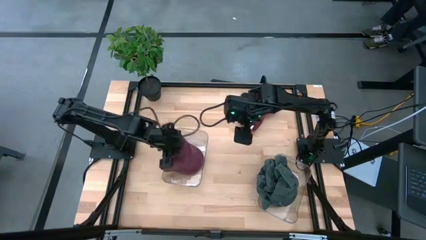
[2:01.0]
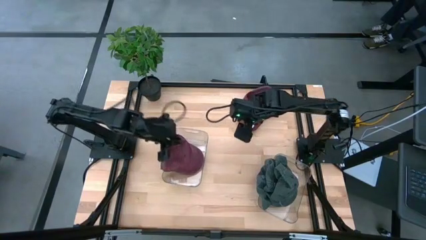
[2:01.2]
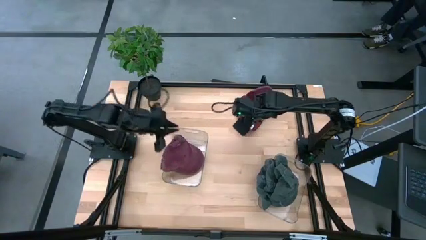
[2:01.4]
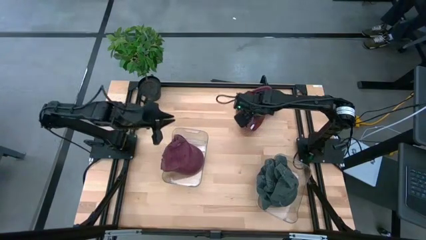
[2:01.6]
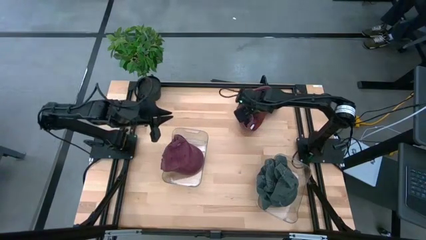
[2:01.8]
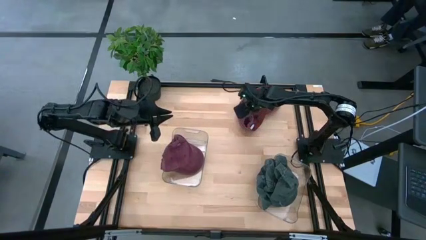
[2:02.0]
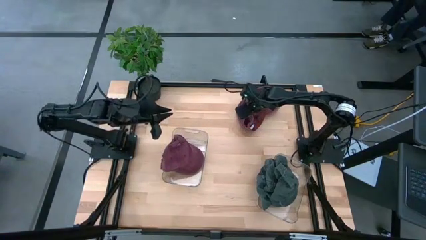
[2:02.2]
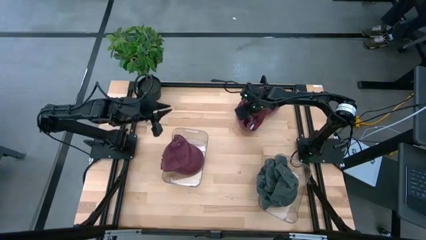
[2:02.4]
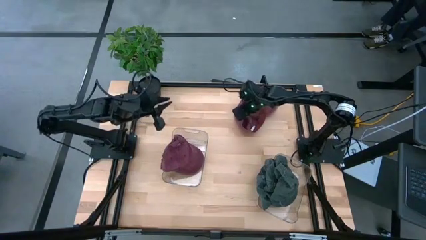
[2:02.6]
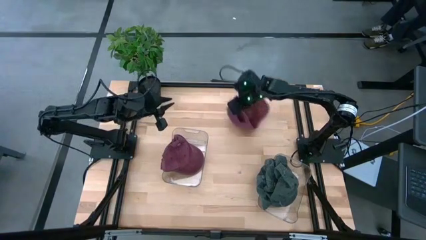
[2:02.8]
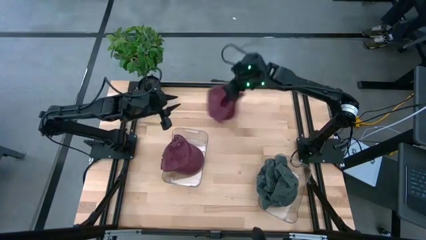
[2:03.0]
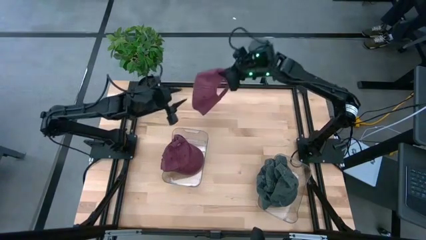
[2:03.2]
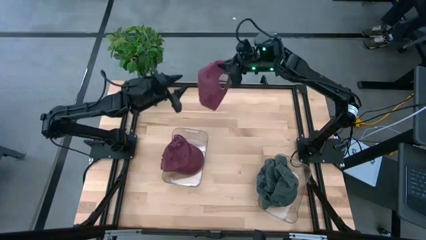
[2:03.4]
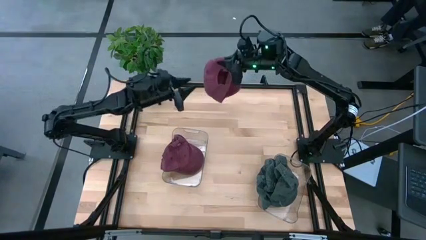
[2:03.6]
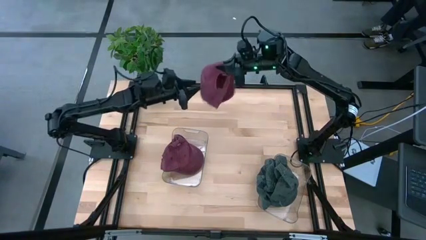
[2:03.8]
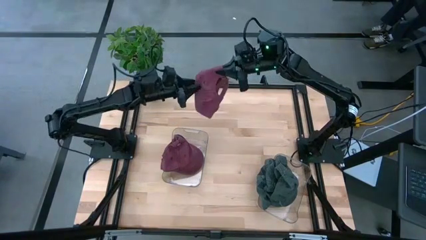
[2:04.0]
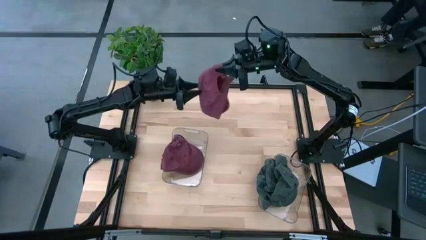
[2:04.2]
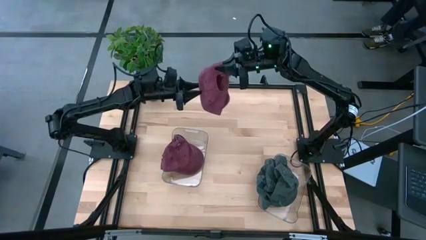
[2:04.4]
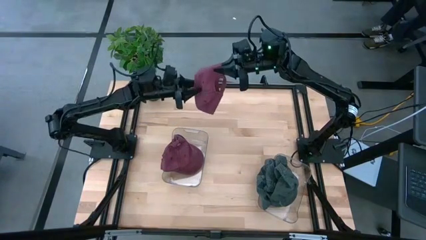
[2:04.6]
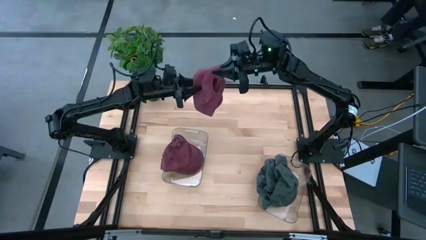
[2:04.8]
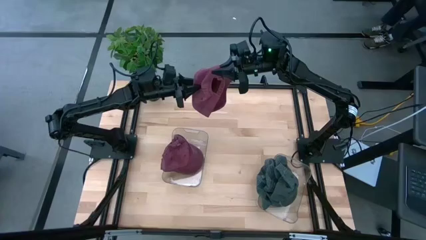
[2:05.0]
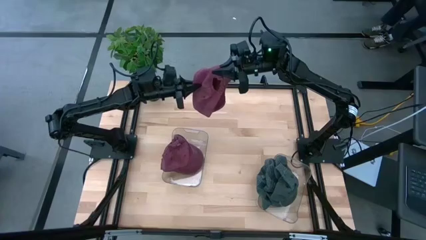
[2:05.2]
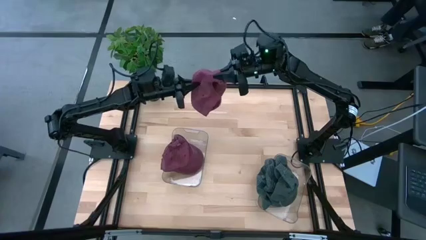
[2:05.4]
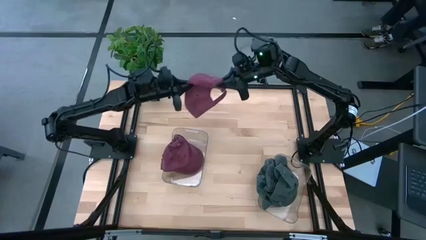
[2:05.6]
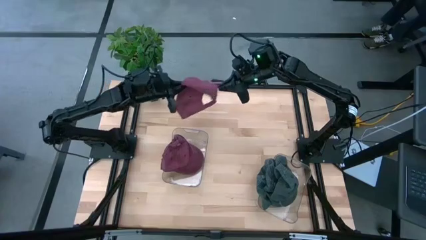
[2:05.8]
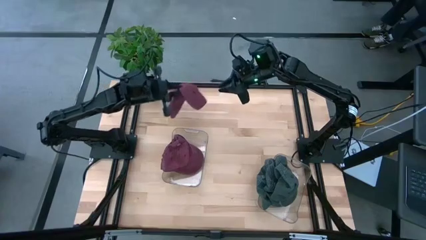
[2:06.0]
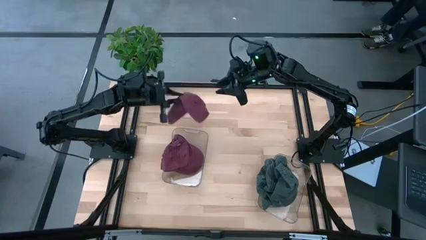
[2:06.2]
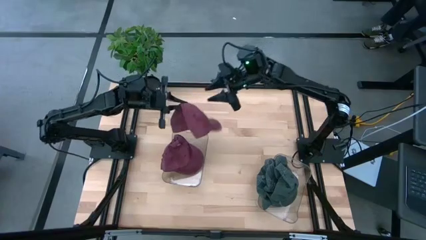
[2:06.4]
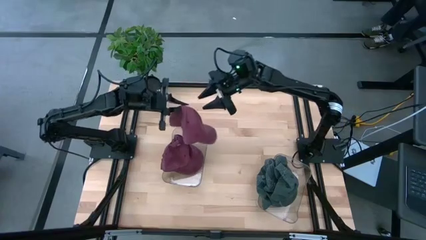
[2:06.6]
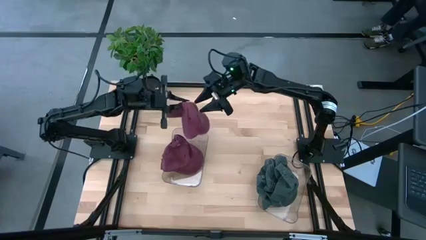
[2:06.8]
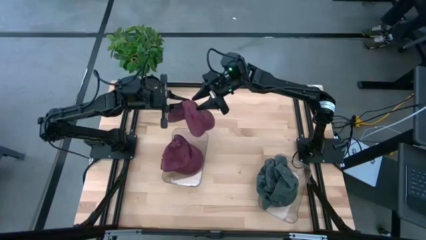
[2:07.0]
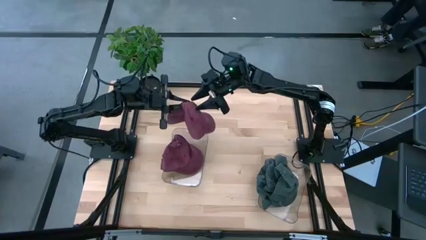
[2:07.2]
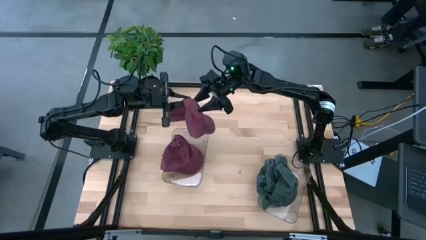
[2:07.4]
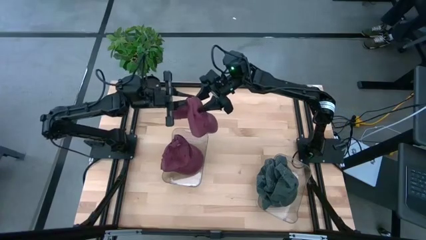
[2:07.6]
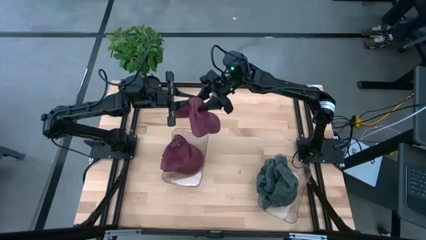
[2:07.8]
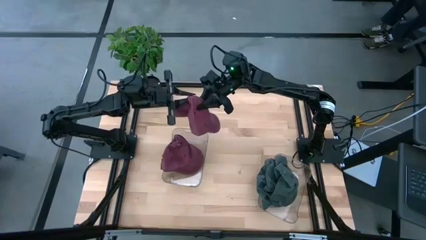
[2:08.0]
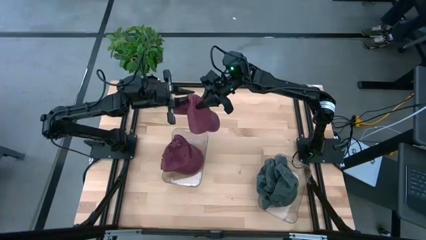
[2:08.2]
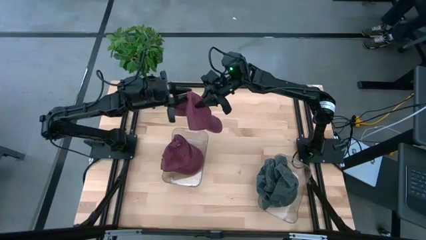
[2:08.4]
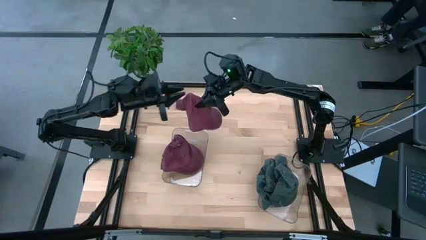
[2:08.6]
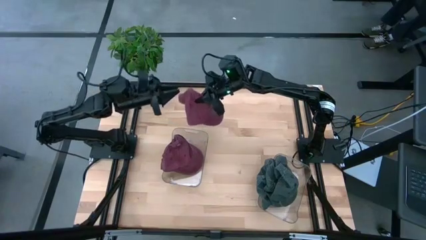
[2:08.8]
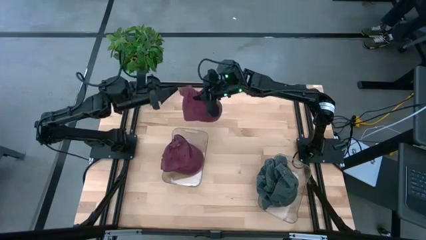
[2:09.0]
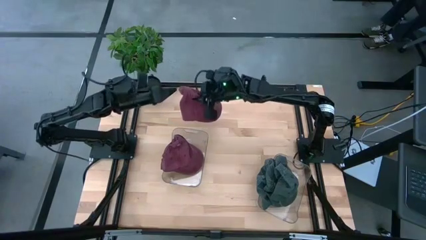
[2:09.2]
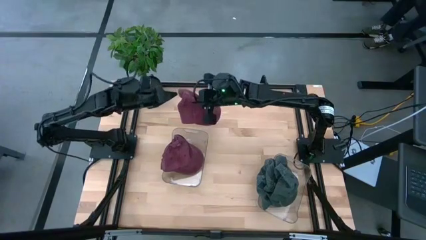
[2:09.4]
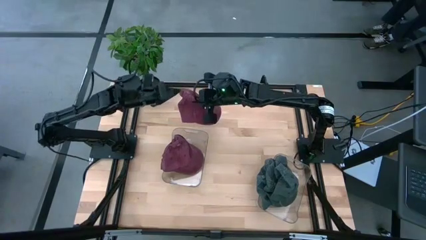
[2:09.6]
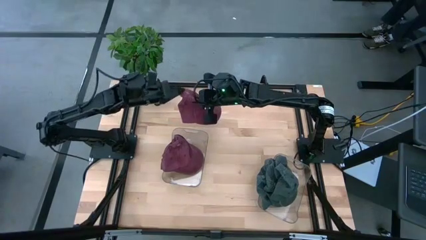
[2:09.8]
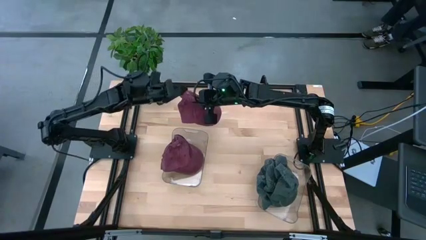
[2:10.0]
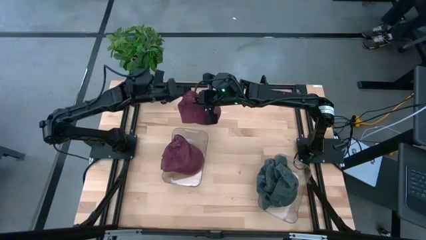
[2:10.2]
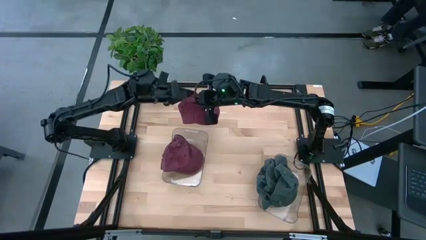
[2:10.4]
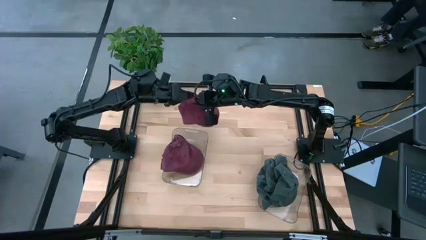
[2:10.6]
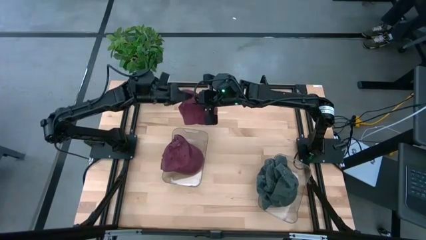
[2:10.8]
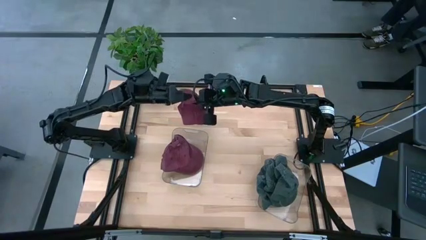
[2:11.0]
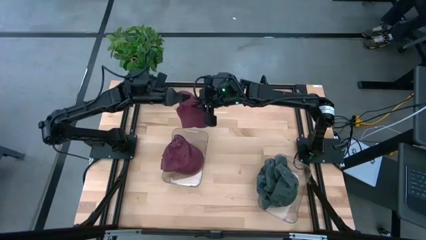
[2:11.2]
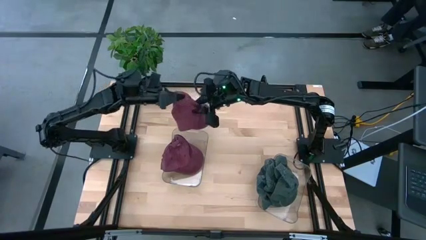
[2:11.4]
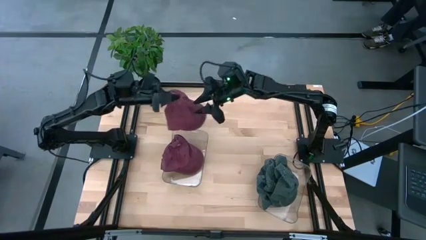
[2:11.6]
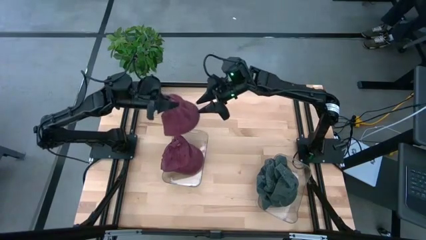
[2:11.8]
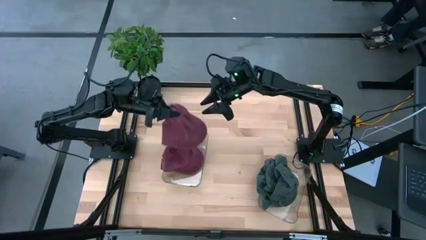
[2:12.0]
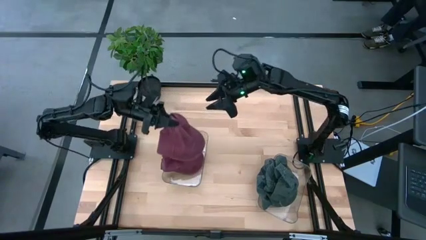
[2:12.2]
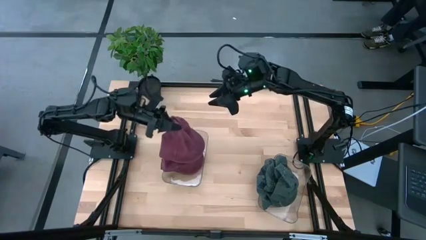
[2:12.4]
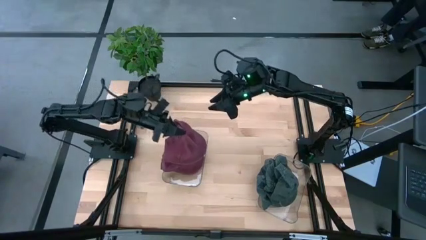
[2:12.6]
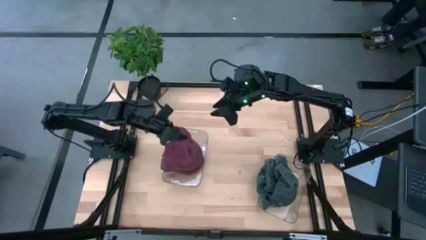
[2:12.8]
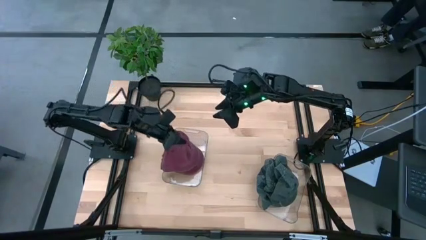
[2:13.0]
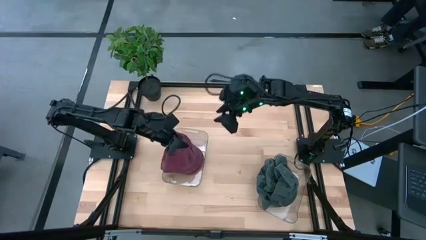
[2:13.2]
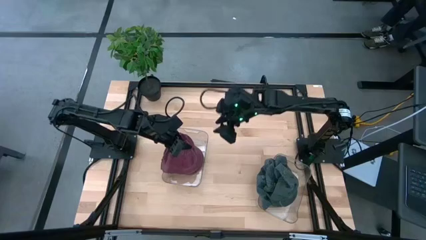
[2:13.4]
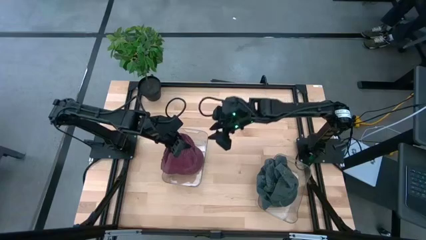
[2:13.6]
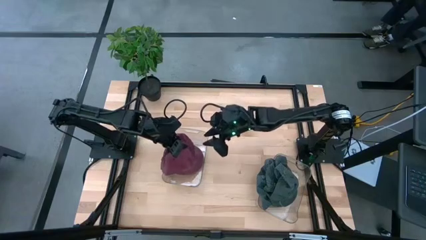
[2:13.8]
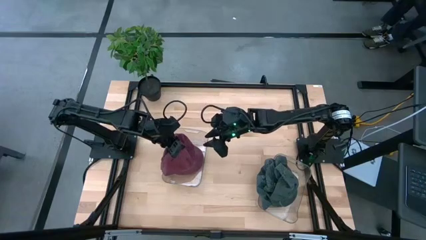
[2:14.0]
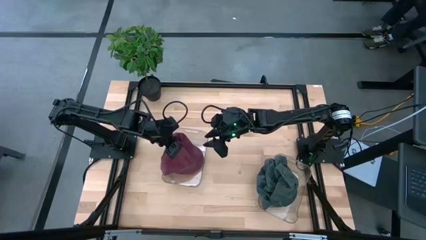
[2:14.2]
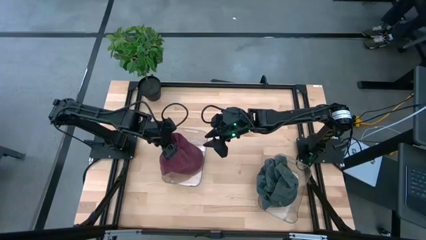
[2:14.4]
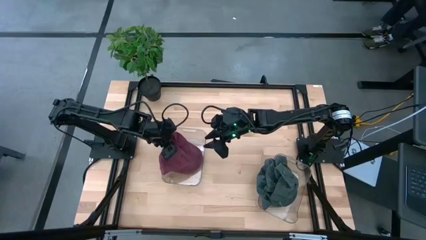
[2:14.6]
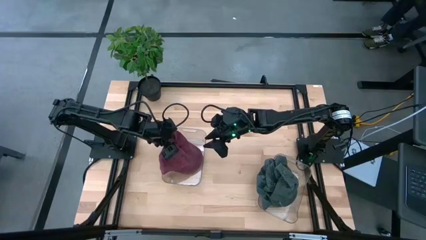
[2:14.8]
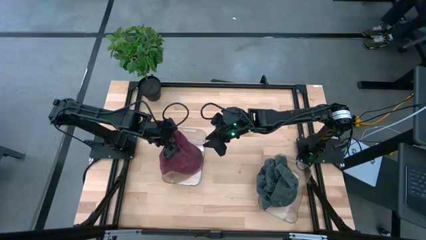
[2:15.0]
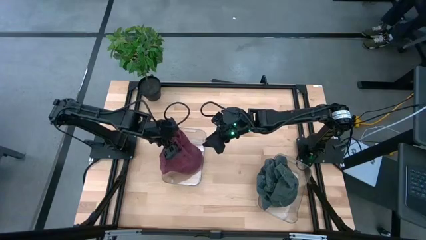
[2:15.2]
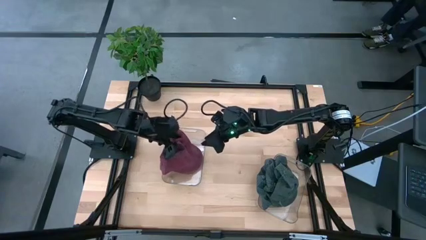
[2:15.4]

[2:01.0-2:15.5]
Task: Pick & Place hat
Put the red cap into the left transparent bin
